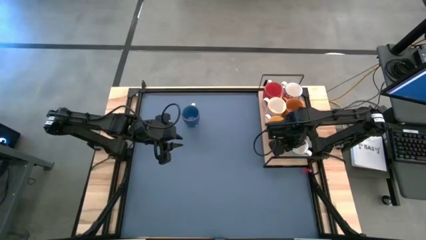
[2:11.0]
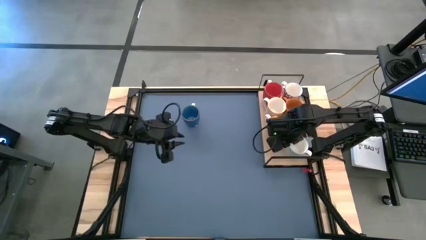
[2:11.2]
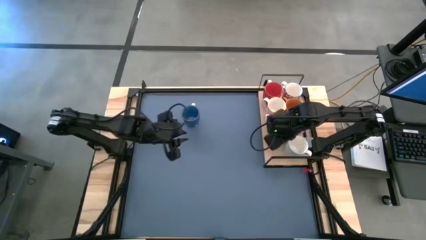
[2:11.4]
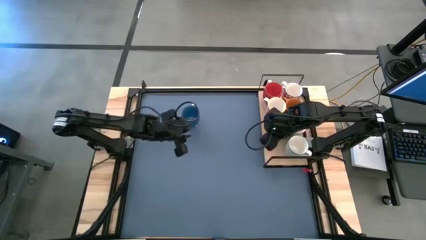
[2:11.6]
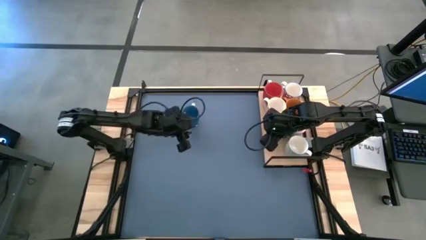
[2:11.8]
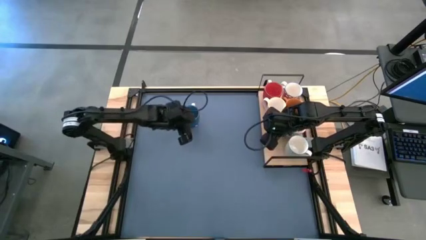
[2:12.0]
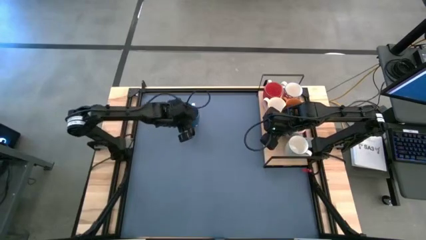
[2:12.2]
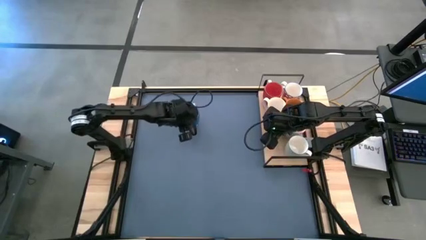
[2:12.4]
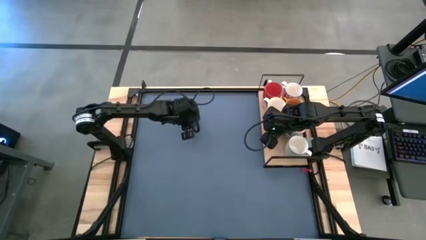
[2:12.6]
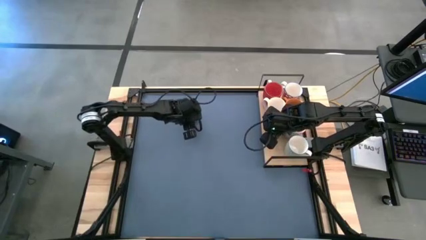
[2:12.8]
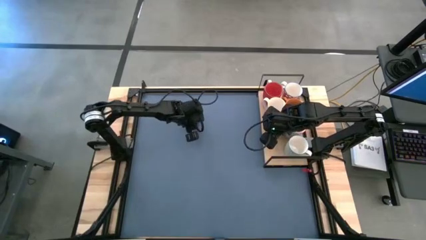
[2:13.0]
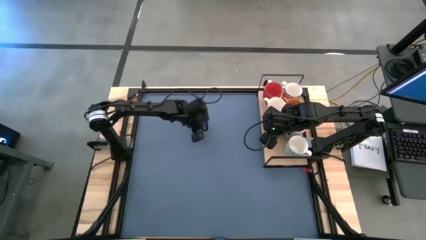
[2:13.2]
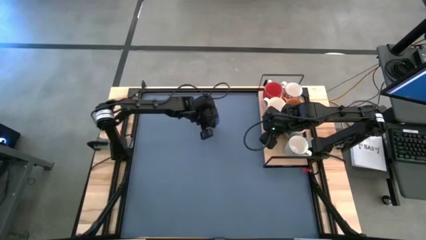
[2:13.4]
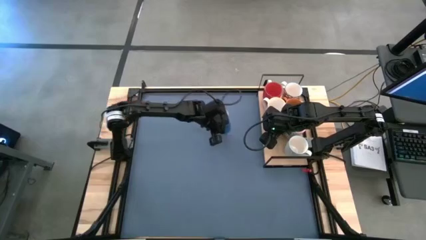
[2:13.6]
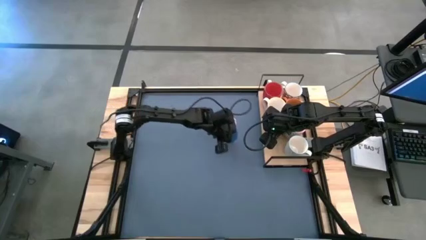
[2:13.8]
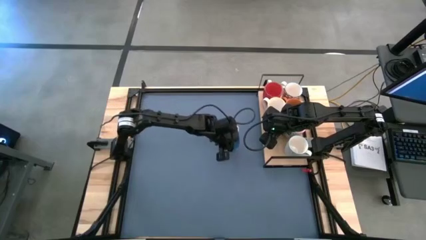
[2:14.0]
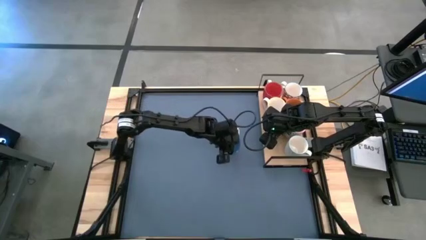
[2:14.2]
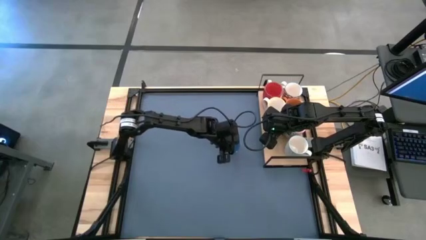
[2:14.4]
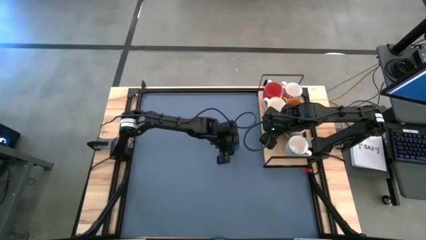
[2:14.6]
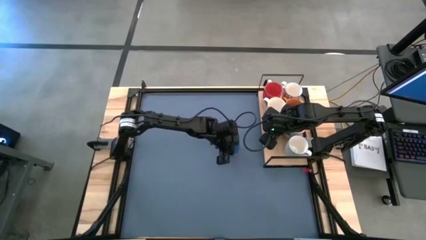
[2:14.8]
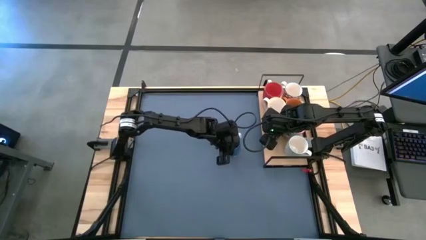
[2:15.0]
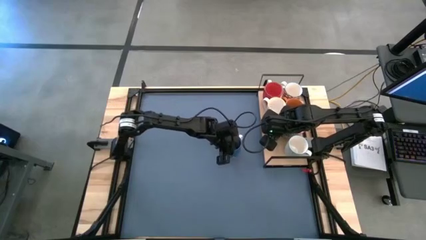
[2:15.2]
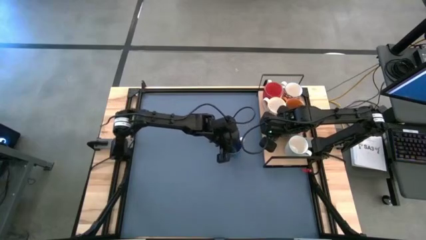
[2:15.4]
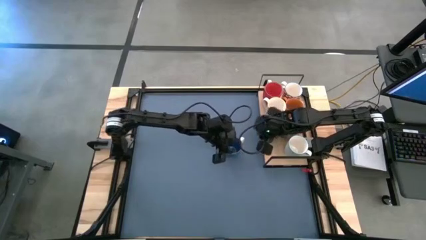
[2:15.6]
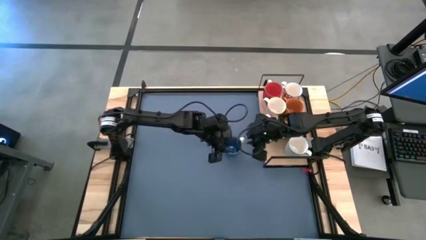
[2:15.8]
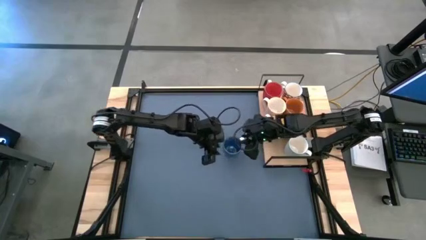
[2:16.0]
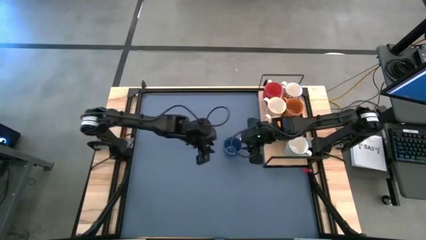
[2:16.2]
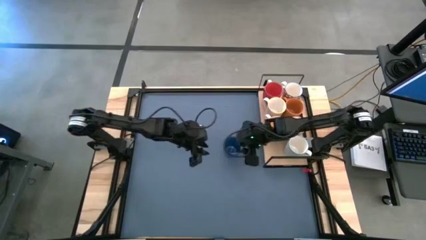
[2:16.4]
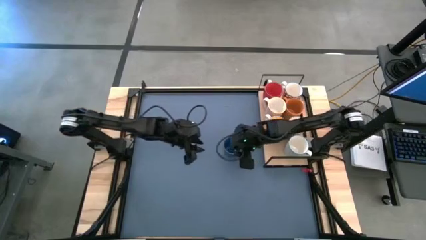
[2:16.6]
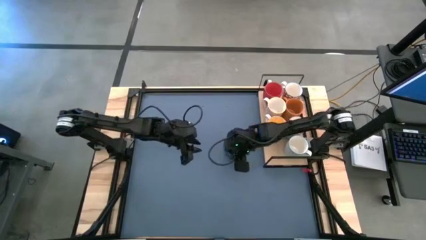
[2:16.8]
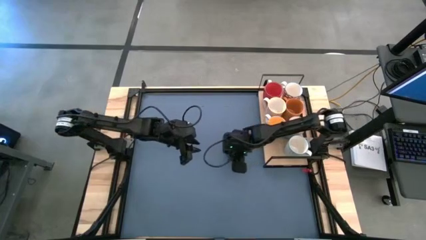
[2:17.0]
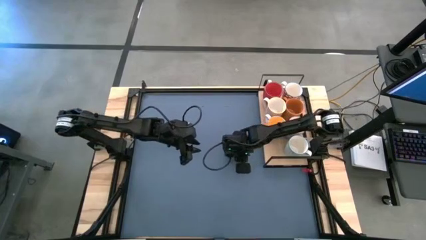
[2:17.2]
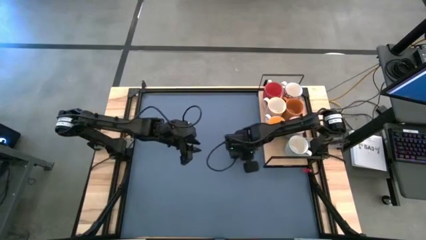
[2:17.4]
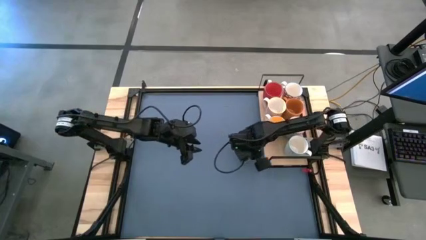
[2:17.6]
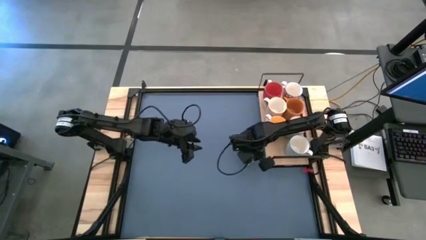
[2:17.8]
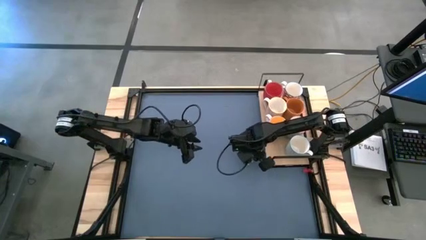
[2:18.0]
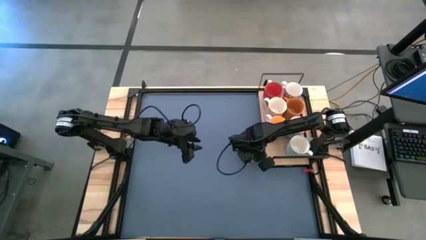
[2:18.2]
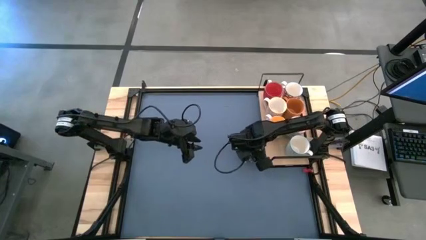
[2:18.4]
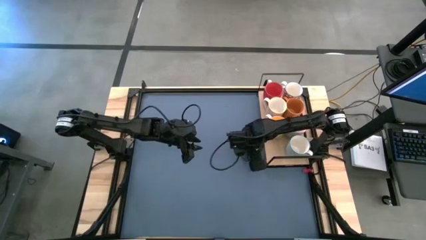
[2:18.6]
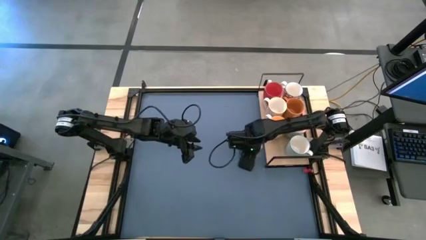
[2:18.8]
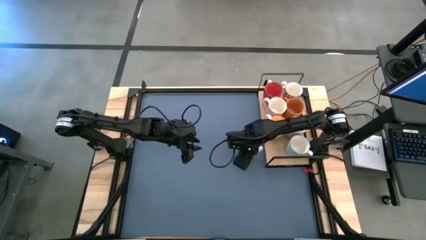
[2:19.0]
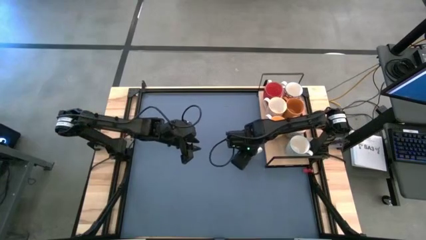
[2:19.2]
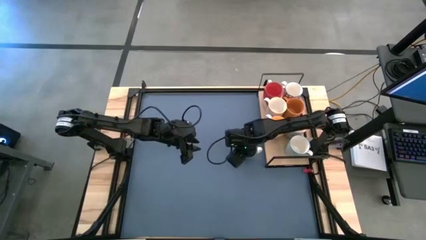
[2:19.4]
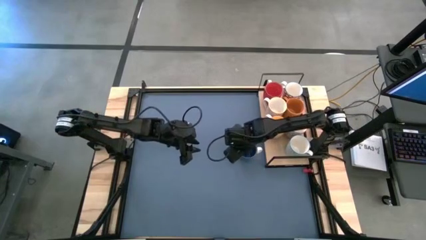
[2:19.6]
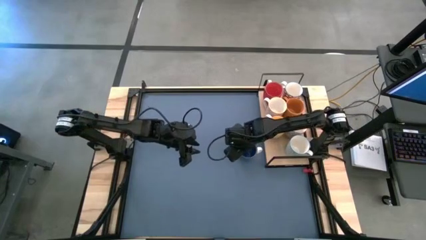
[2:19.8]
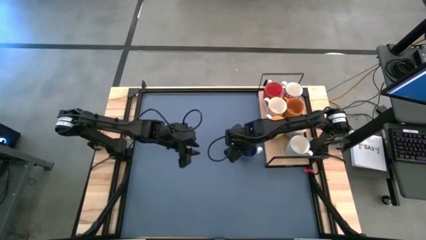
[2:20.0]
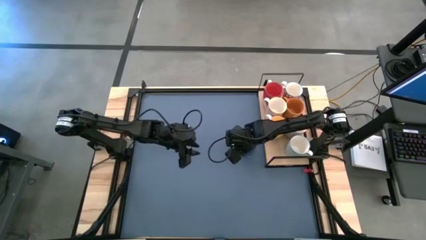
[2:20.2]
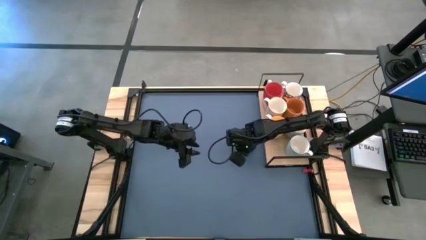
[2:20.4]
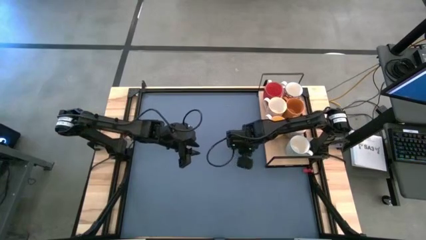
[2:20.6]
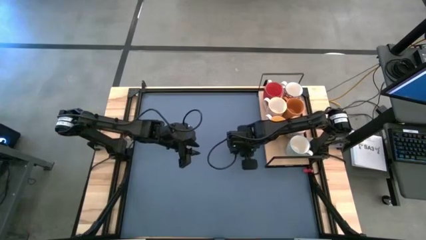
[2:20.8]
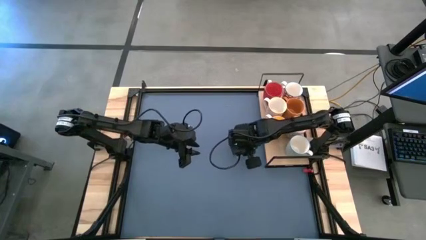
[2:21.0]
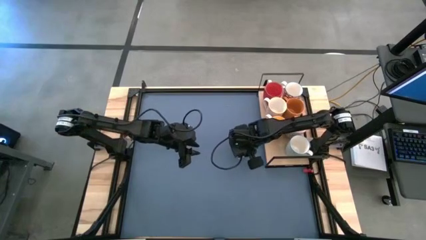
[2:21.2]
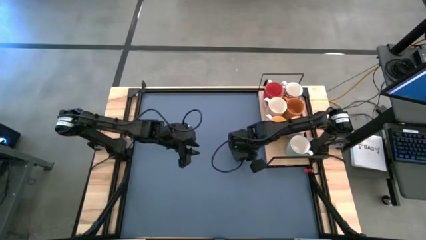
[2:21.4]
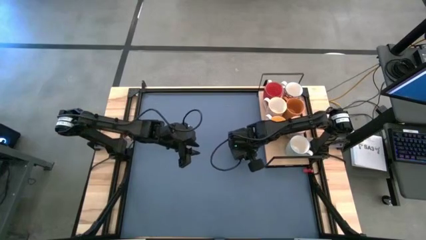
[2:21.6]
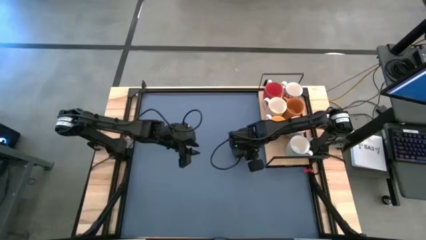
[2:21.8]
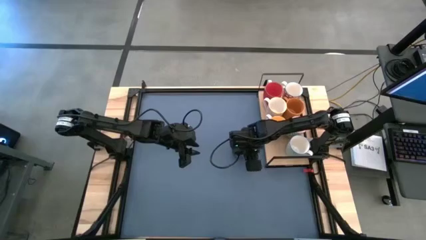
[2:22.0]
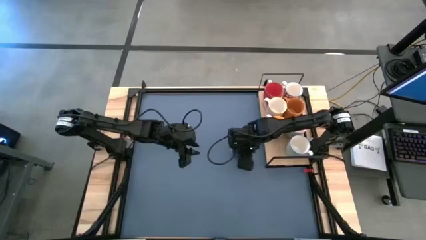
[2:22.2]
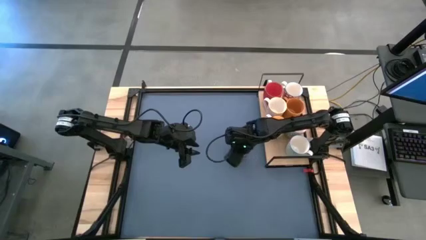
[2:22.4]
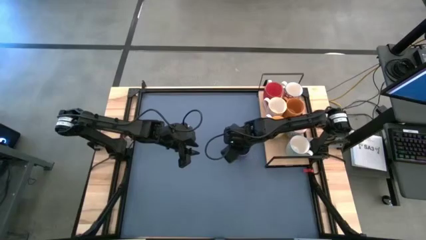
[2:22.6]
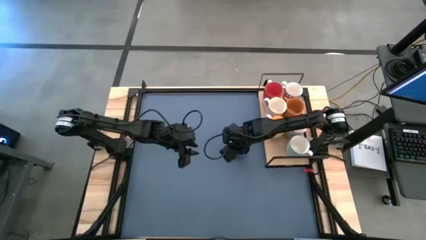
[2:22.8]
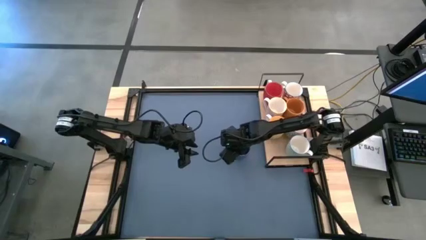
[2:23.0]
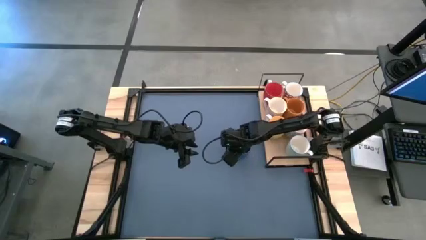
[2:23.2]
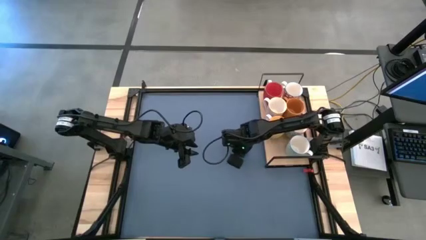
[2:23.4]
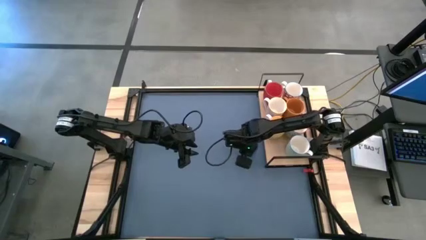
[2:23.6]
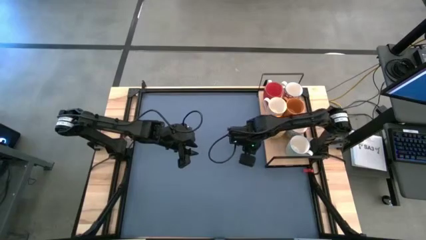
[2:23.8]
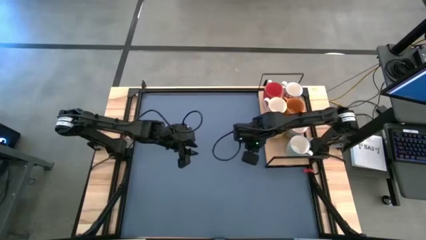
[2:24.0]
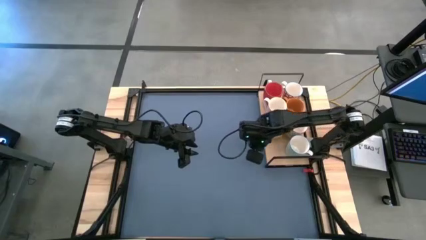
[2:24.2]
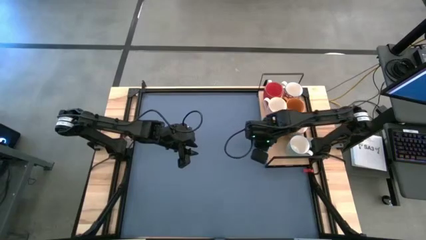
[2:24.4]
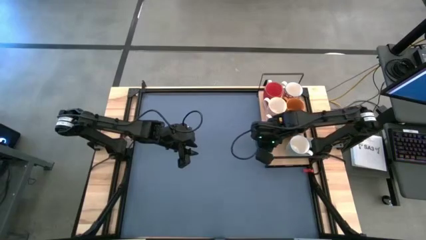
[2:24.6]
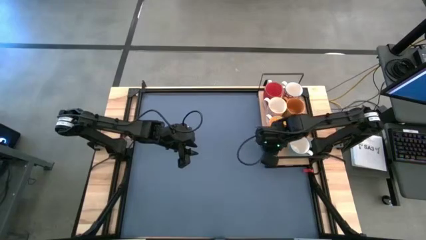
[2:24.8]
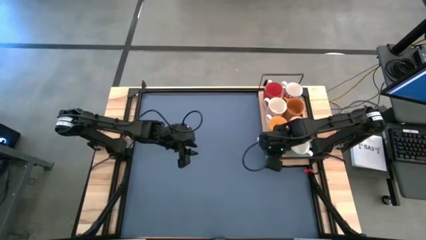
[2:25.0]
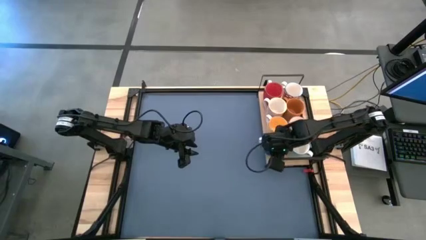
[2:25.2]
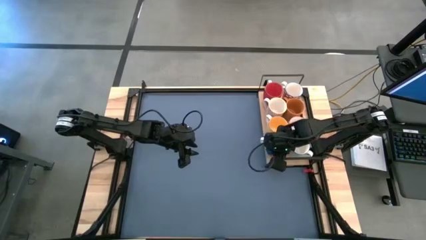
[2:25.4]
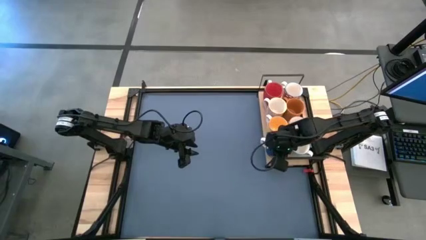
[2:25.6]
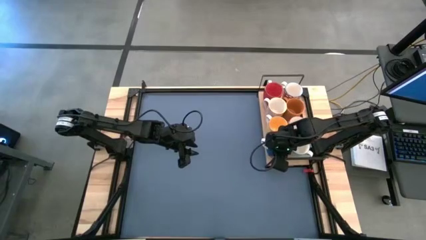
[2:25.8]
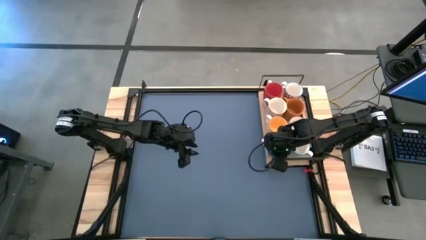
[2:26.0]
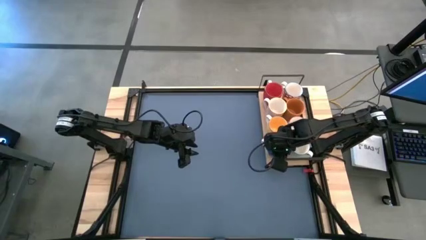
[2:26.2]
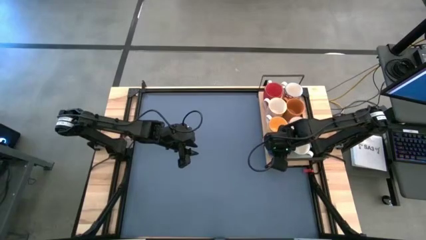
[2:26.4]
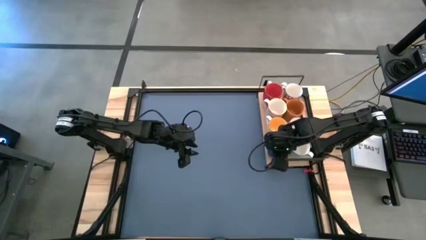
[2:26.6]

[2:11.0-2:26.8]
Task: Place coffee mugs
Put the blue mug on the shelf
